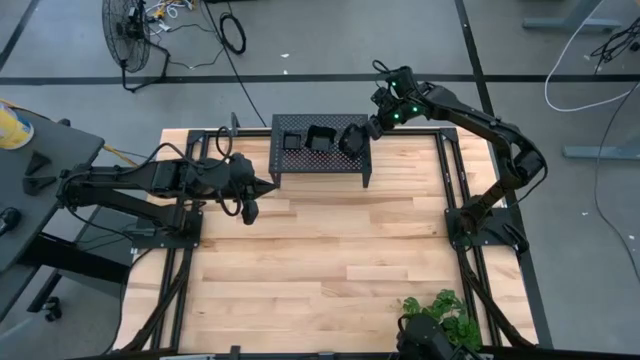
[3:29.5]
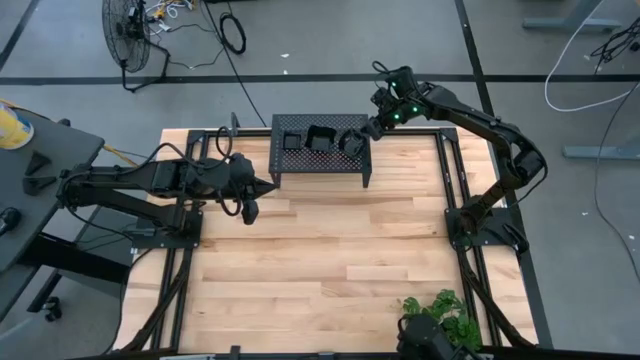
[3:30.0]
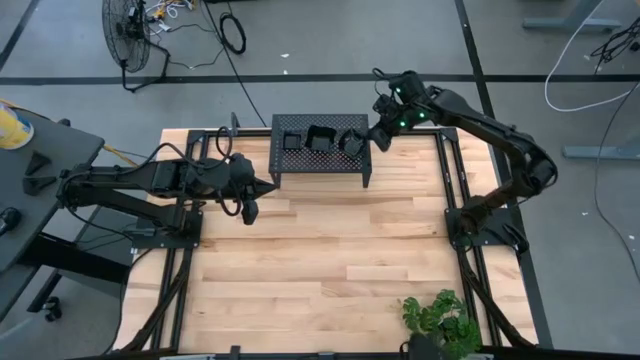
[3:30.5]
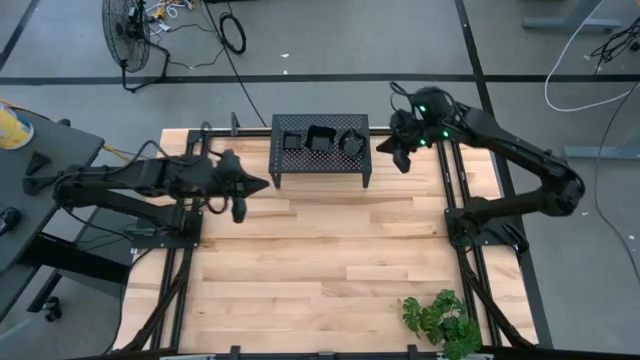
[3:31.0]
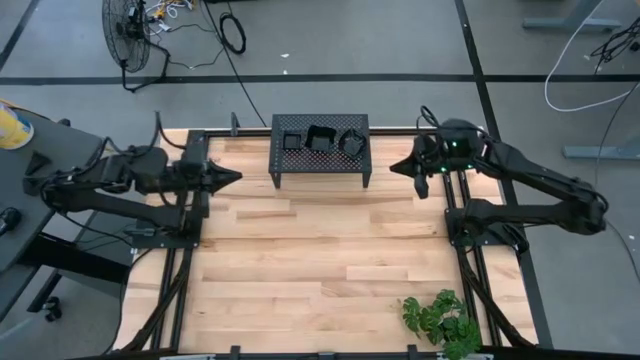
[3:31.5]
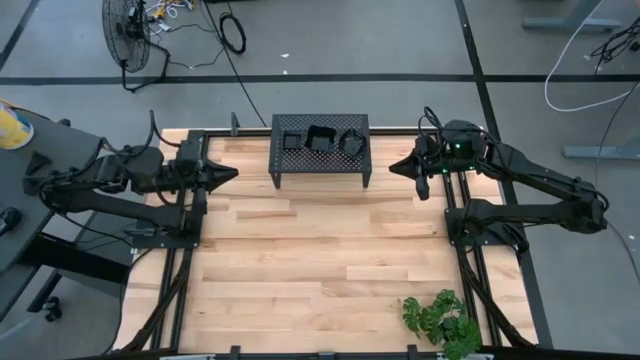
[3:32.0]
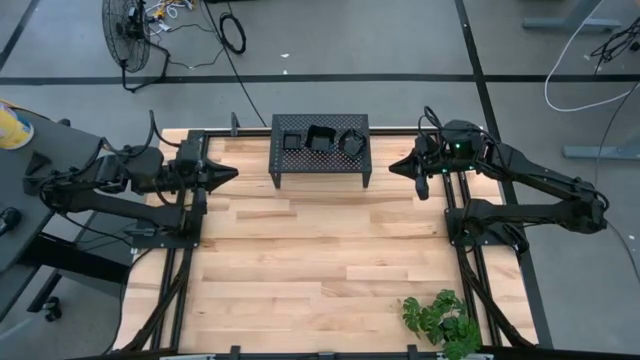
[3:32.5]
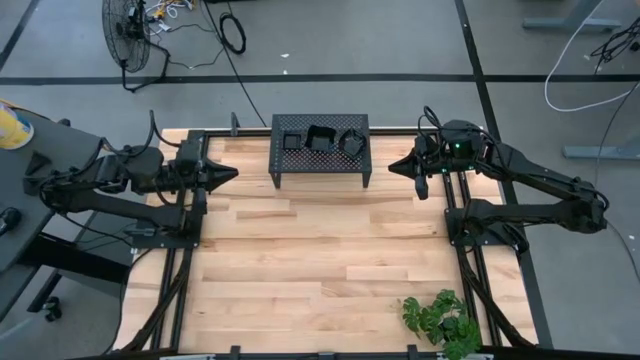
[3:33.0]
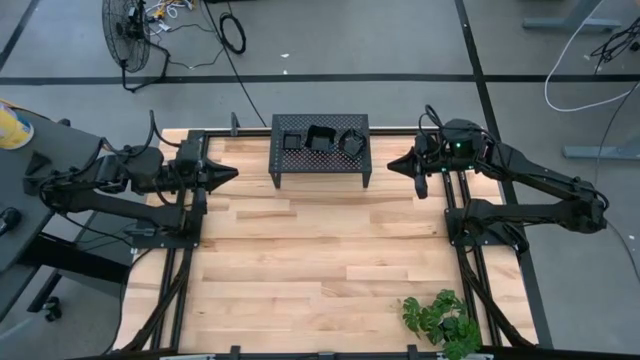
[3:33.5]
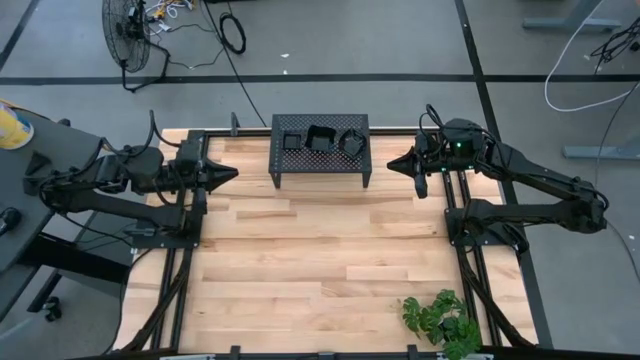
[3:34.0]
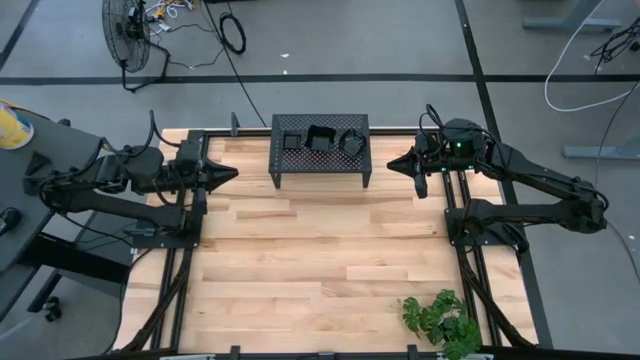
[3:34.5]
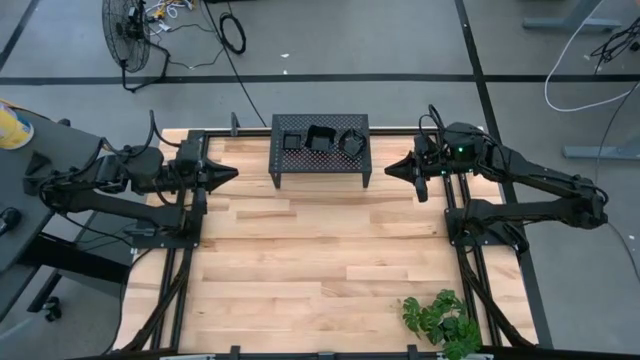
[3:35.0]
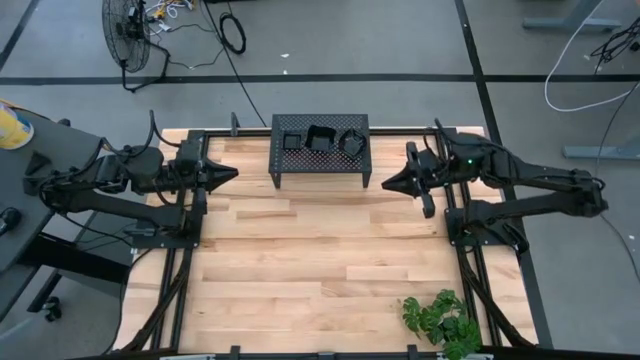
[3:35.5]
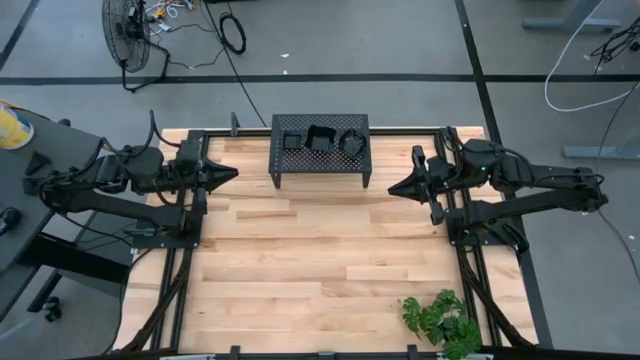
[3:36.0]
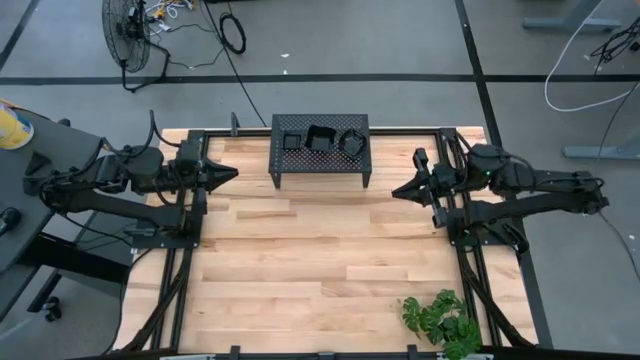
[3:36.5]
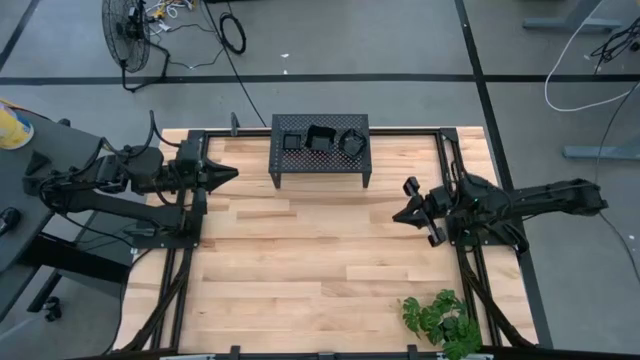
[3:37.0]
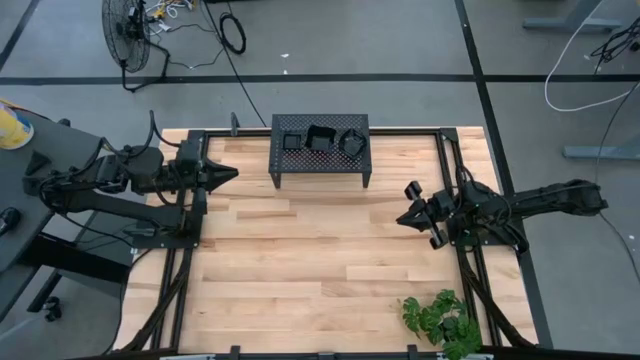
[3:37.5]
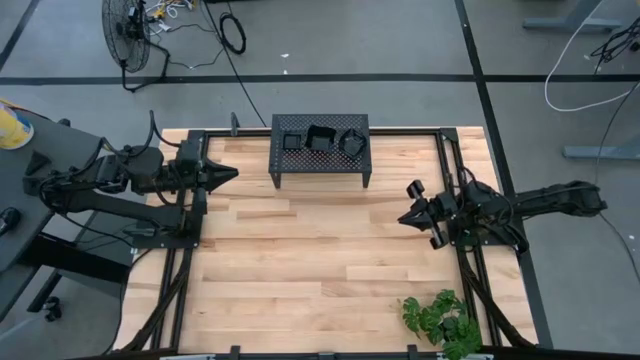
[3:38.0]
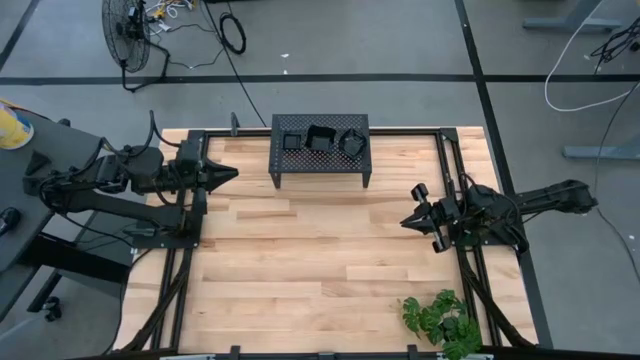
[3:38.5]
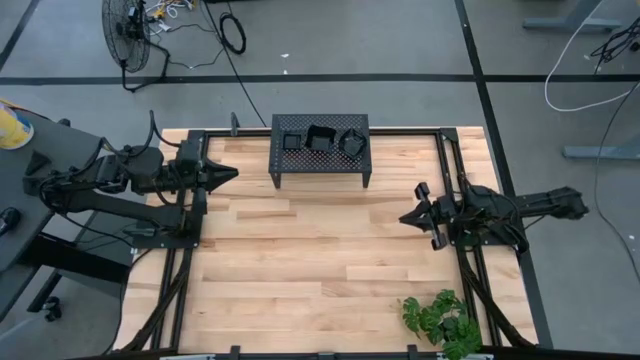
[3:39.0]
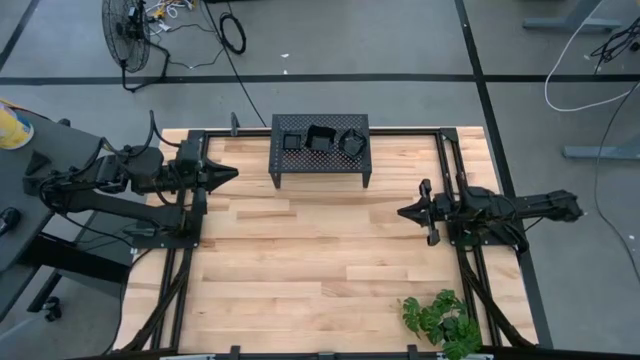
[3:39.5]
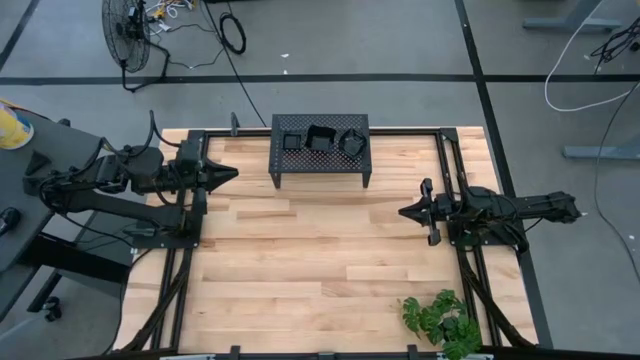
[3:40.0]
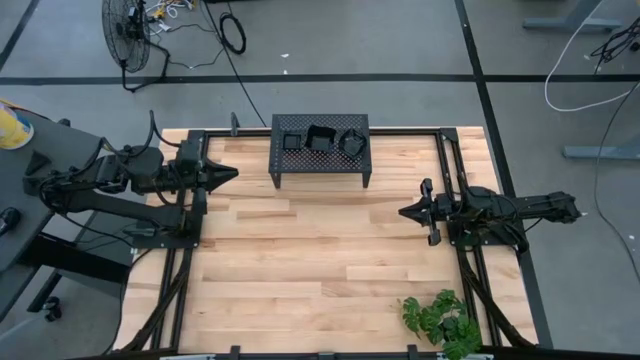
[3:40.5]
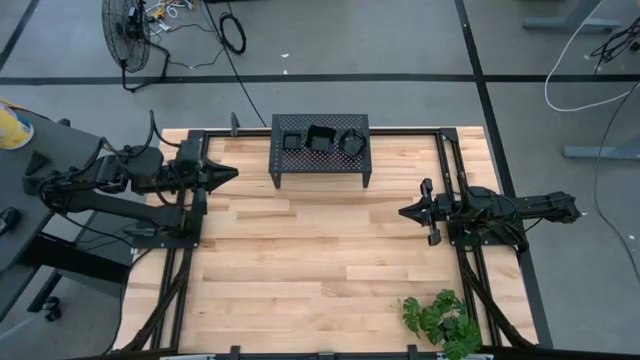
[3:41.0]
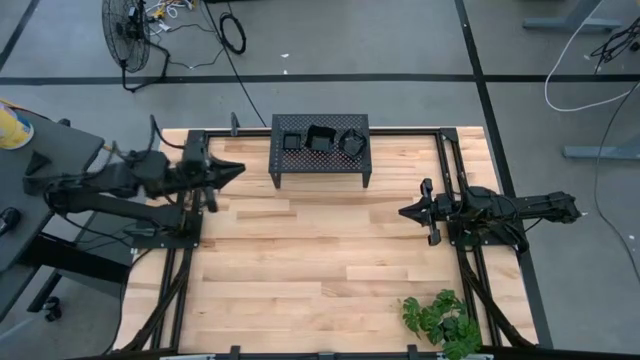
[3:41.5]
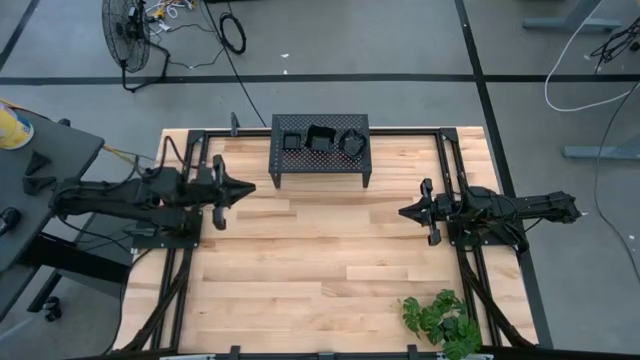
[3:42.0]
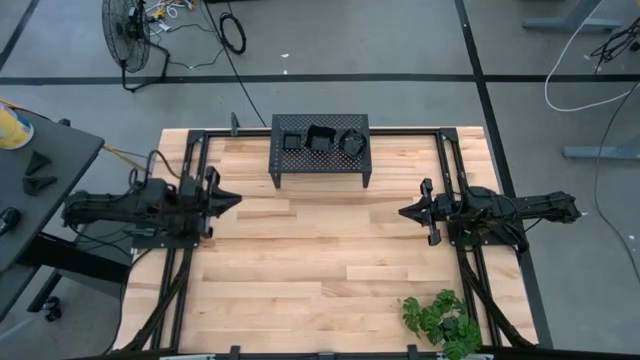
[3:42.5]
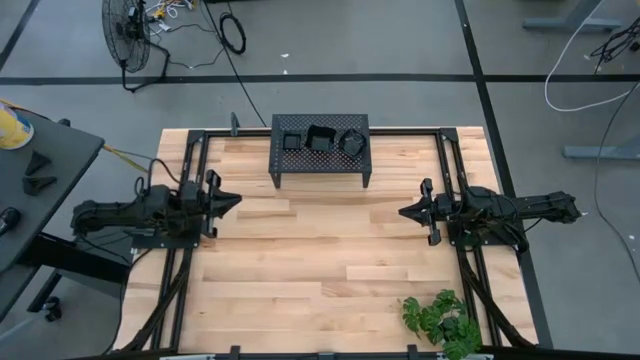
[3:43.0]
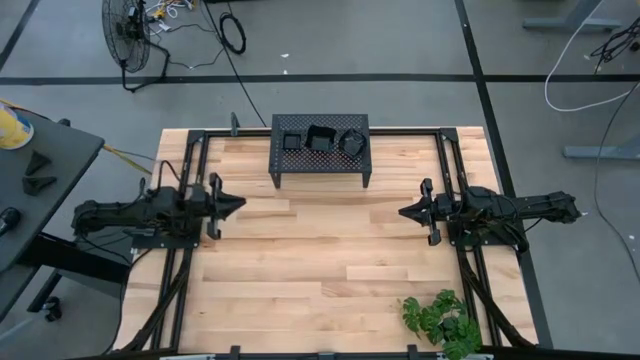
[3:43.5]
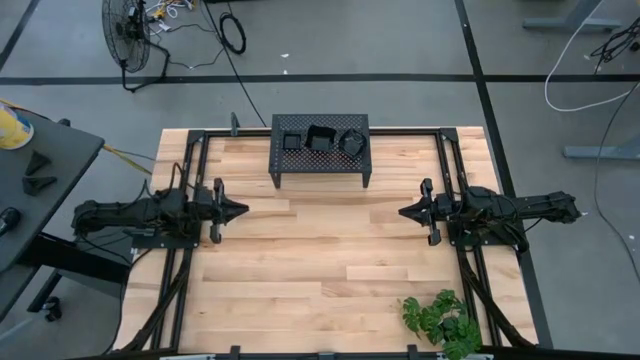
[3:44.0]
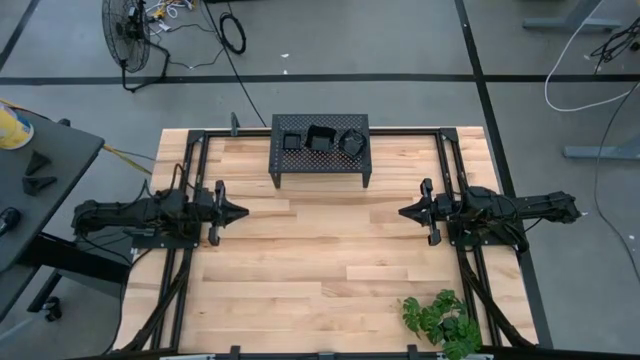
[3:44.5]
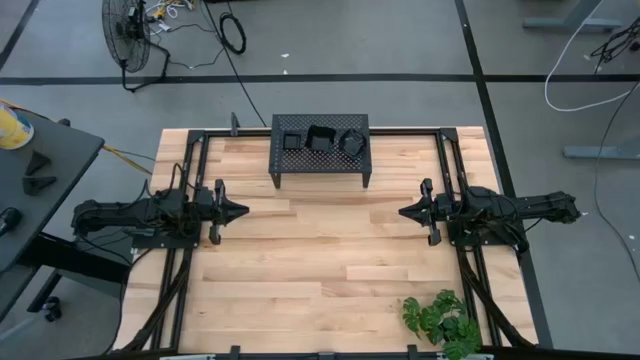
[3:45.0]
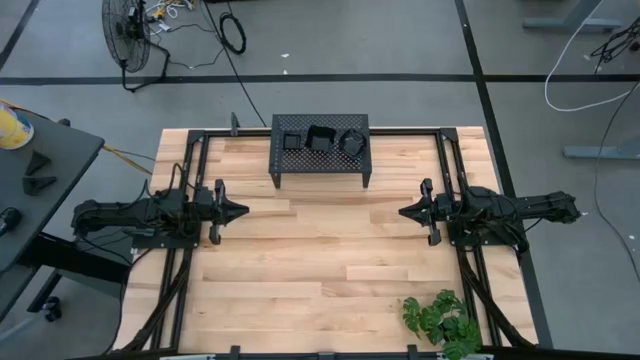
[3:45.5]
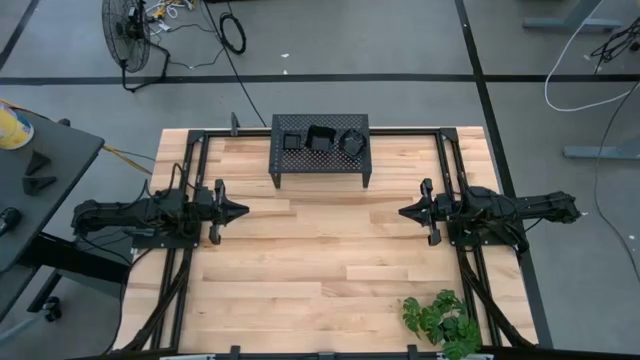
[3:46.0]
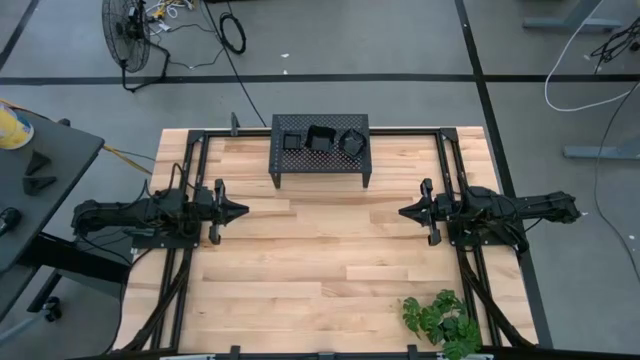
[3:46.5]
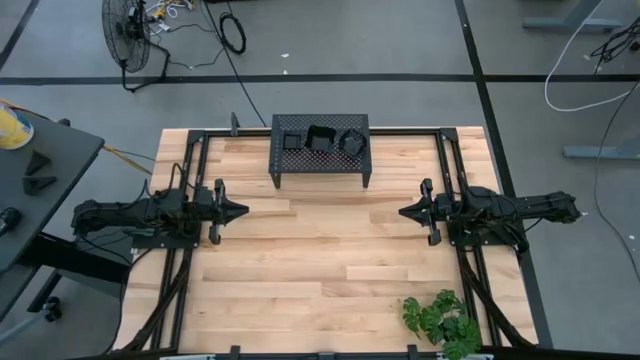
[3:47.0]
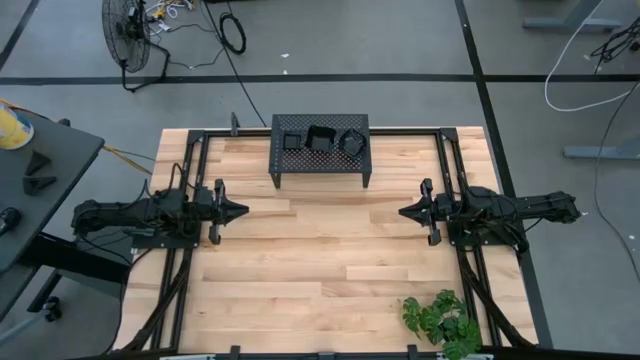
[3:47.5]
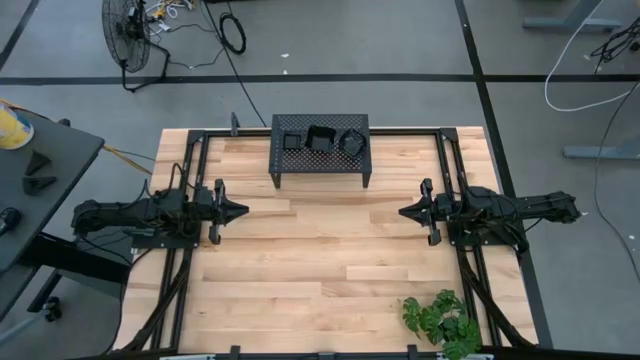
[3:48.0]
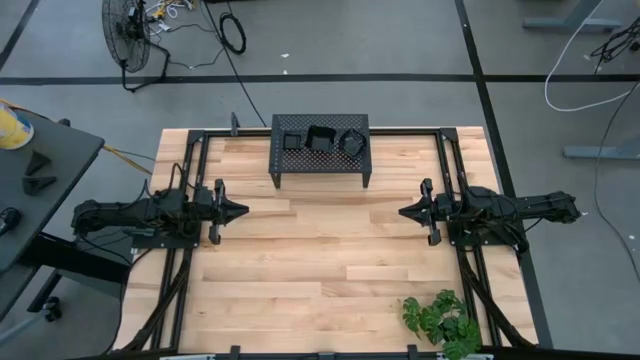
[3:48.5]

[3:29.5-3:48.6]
Task: Pick & Place Mini shaped plates
Return to Home Position

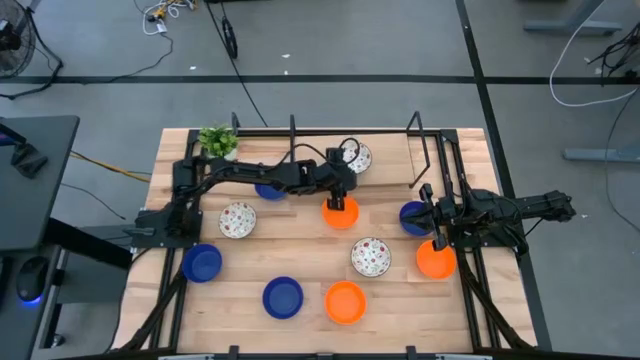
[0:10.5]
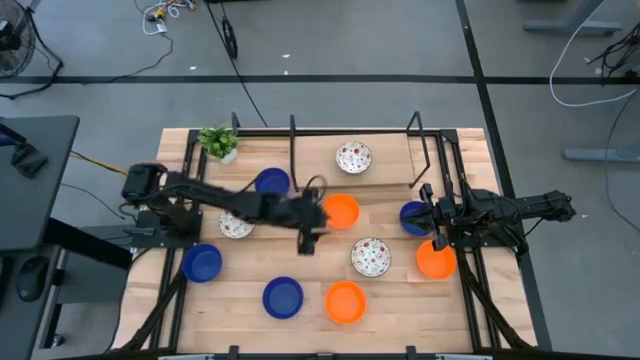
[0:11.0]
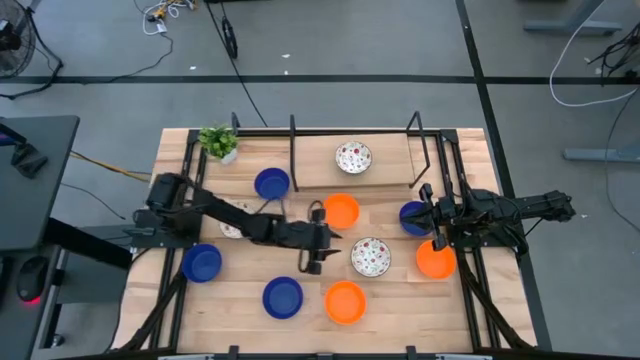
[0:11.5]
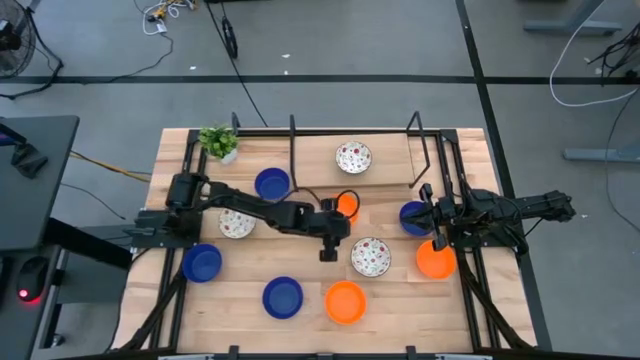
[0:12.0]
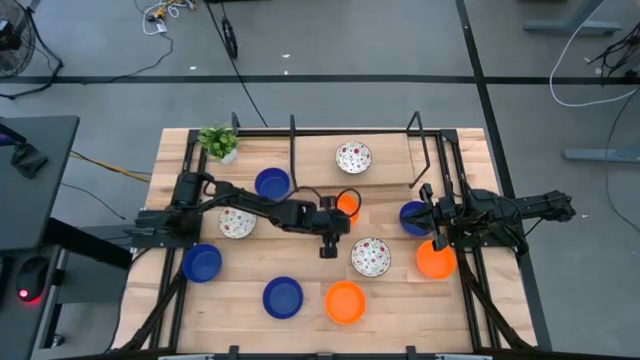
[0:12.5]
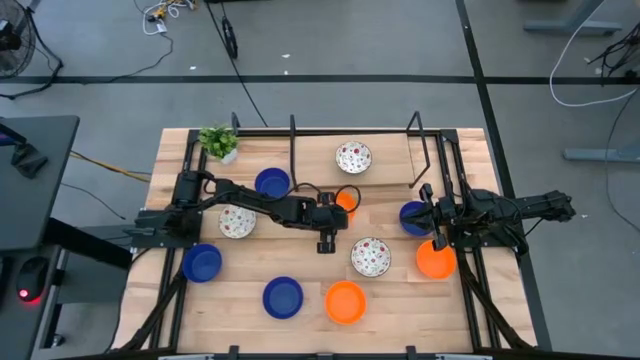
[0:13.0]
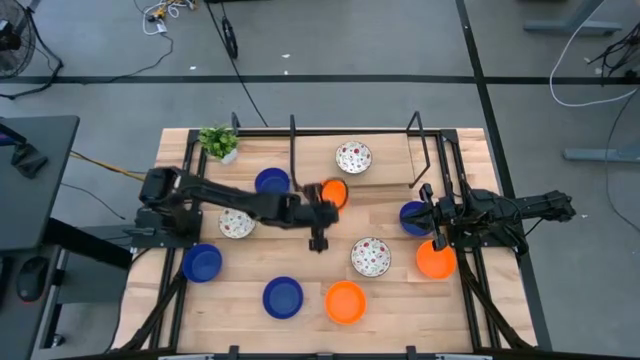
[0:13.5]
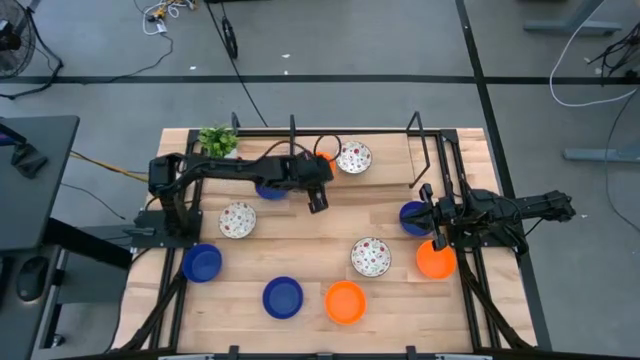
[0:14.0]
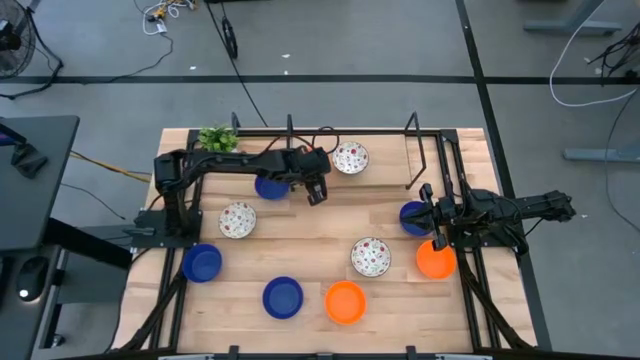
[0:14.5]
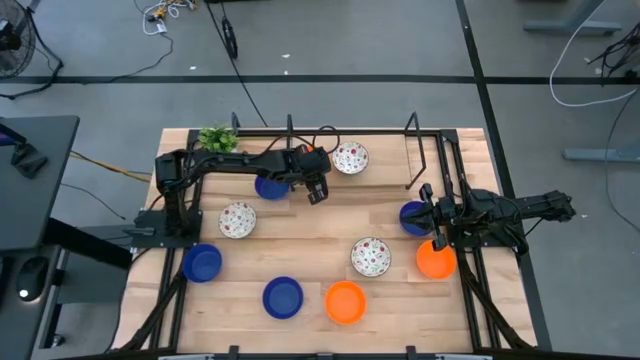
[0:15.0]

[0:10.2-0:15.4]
Task: Pick & Place Mini bowls
Put the orange bowl on the shelf
